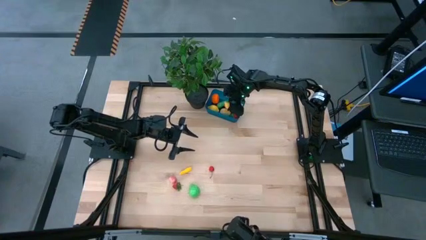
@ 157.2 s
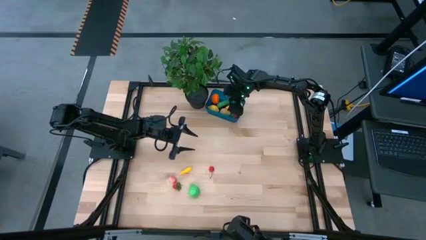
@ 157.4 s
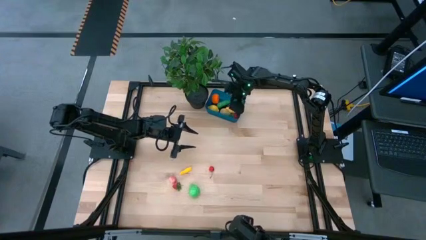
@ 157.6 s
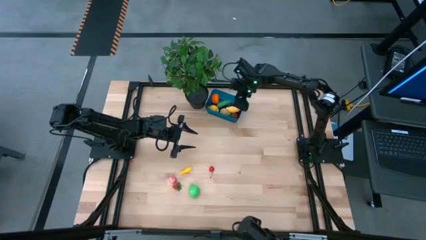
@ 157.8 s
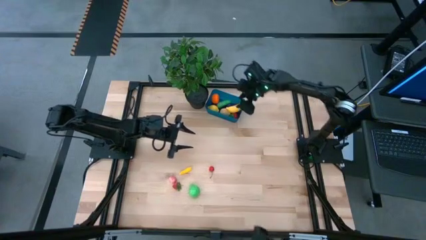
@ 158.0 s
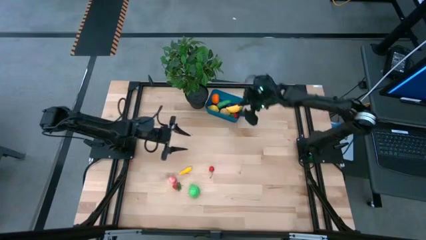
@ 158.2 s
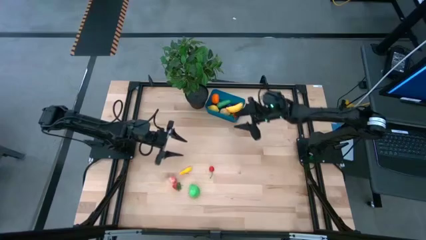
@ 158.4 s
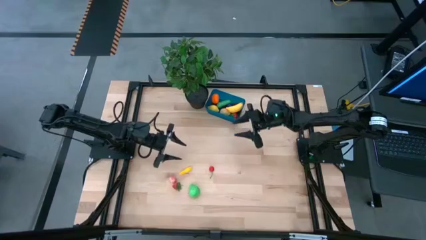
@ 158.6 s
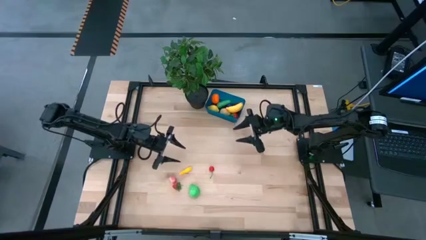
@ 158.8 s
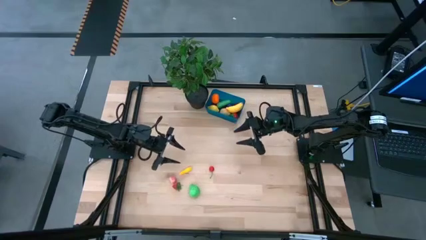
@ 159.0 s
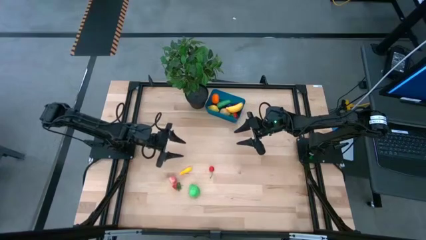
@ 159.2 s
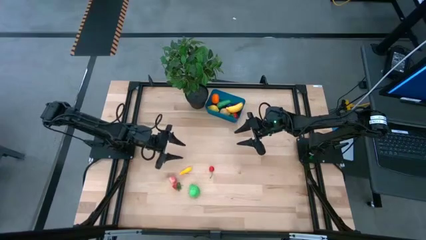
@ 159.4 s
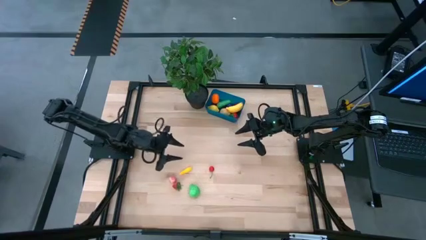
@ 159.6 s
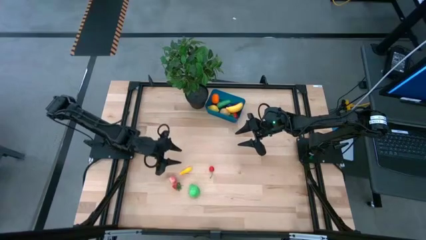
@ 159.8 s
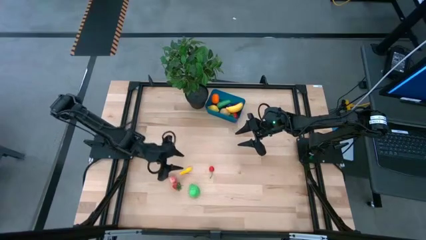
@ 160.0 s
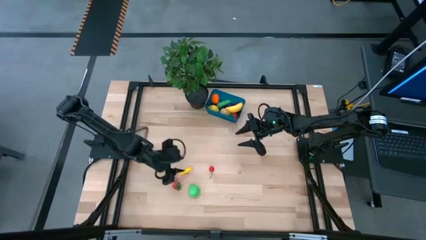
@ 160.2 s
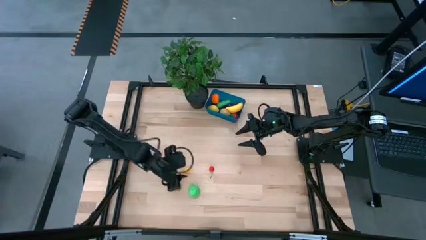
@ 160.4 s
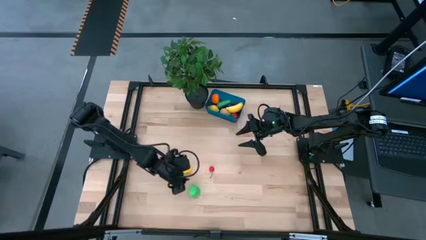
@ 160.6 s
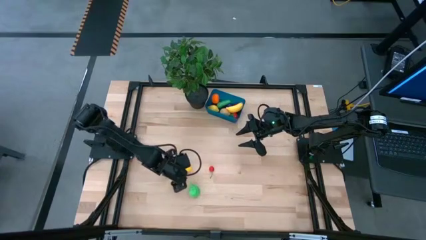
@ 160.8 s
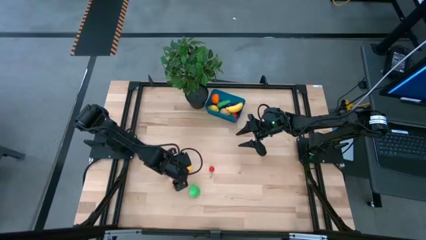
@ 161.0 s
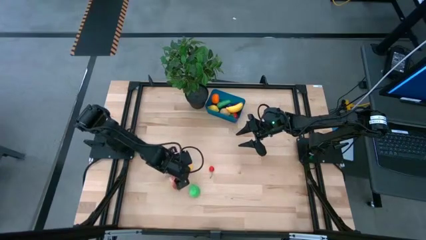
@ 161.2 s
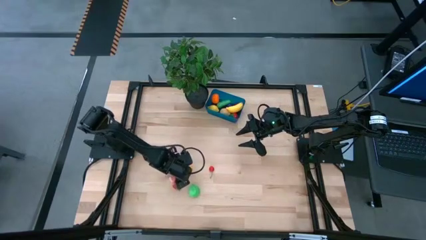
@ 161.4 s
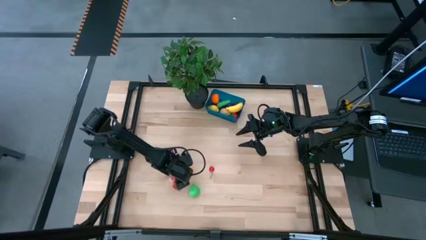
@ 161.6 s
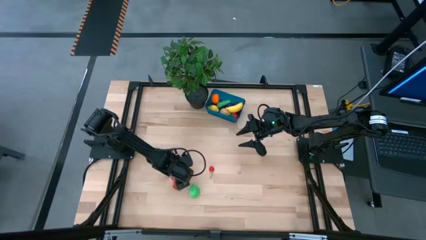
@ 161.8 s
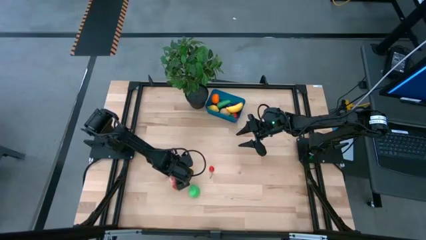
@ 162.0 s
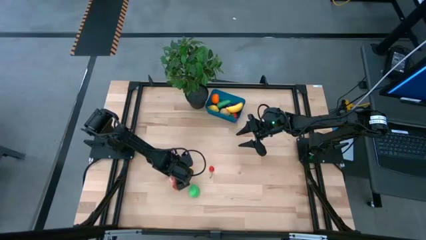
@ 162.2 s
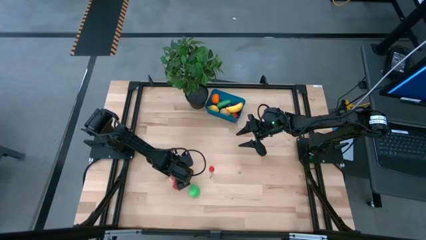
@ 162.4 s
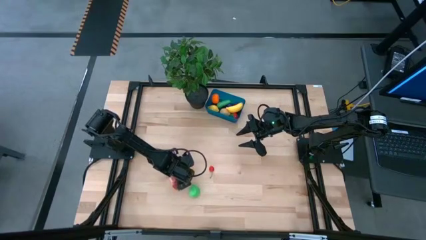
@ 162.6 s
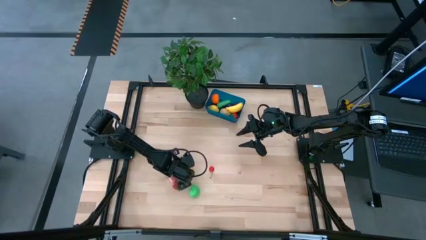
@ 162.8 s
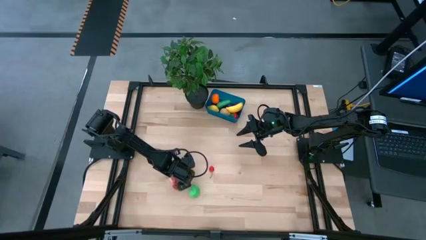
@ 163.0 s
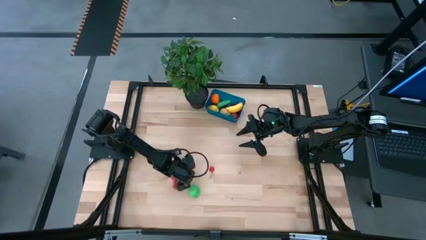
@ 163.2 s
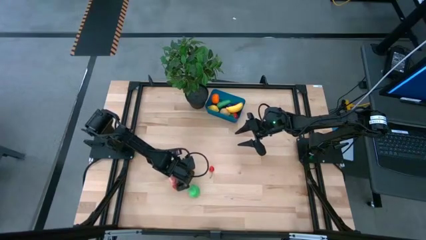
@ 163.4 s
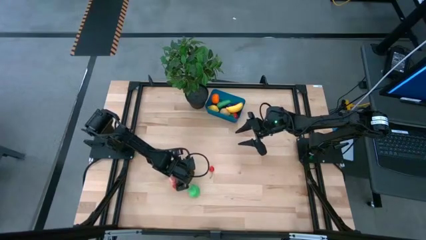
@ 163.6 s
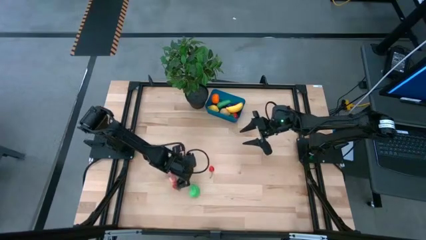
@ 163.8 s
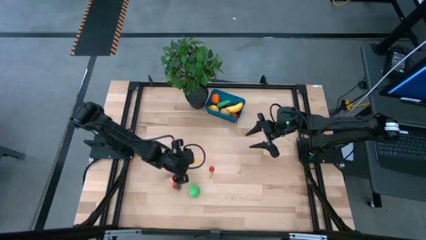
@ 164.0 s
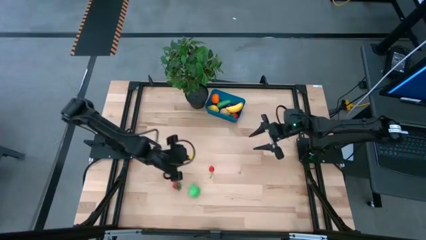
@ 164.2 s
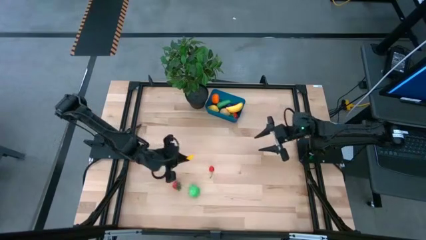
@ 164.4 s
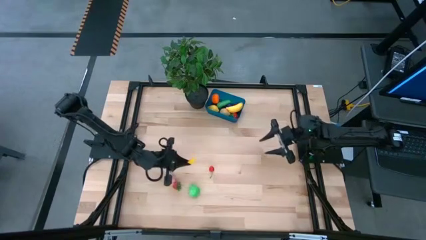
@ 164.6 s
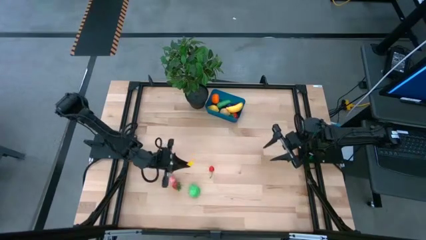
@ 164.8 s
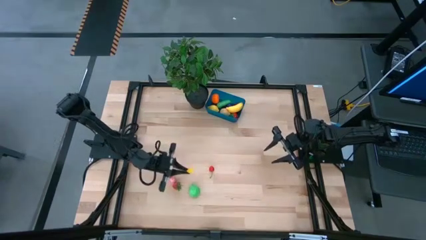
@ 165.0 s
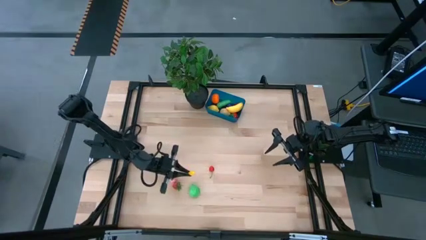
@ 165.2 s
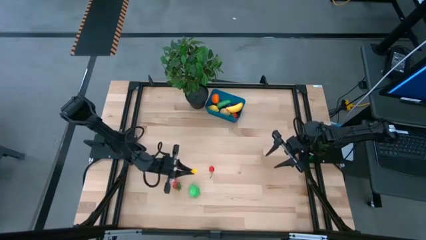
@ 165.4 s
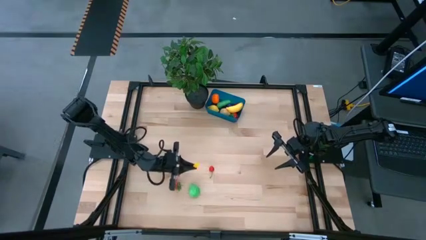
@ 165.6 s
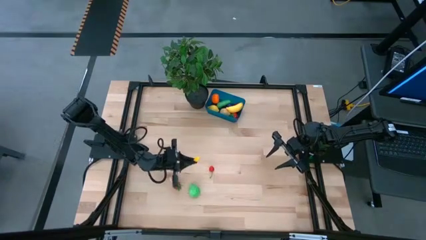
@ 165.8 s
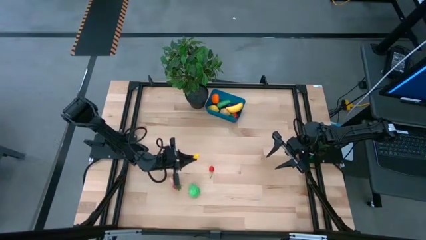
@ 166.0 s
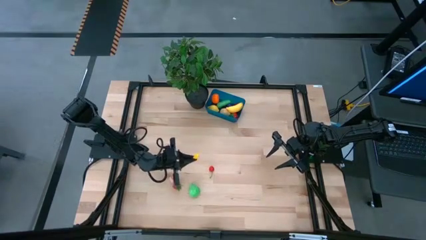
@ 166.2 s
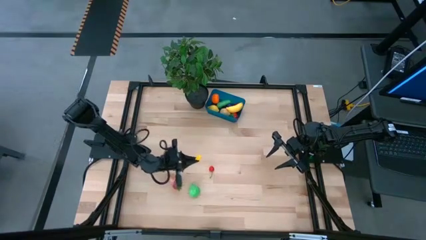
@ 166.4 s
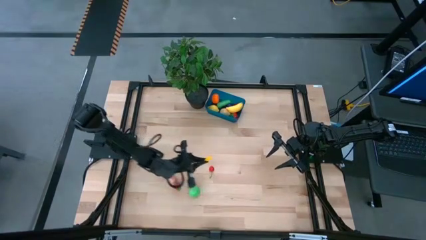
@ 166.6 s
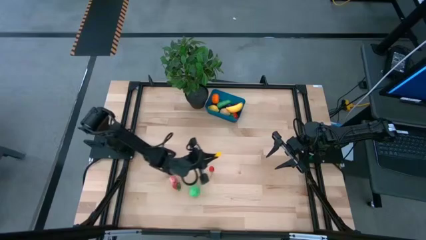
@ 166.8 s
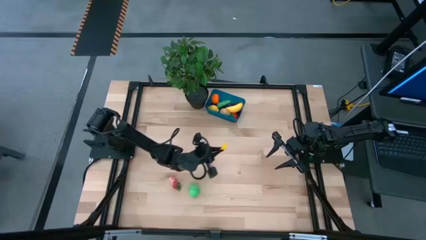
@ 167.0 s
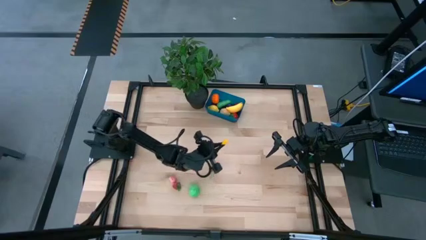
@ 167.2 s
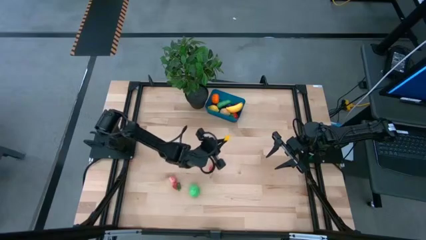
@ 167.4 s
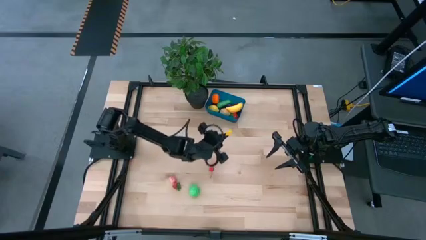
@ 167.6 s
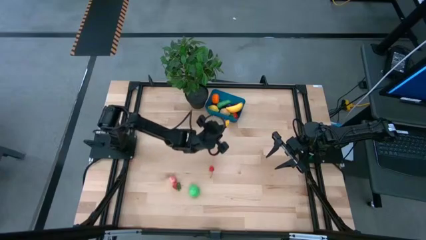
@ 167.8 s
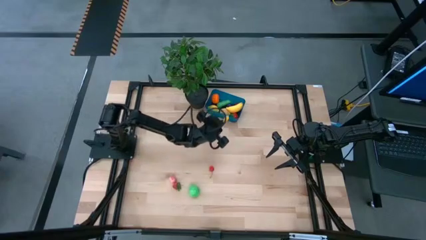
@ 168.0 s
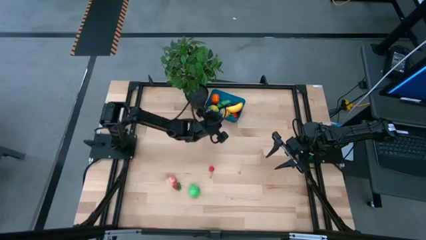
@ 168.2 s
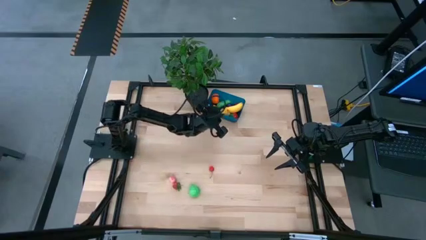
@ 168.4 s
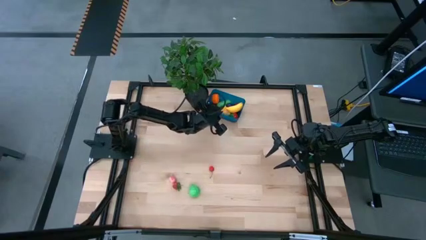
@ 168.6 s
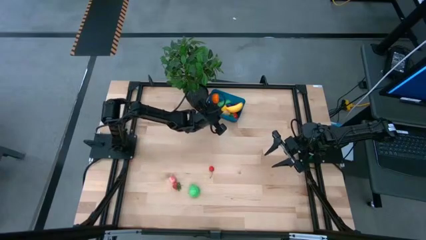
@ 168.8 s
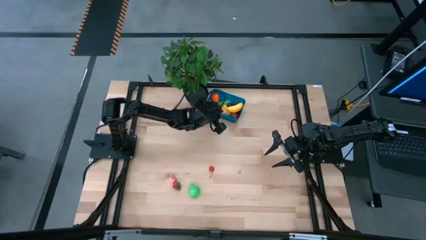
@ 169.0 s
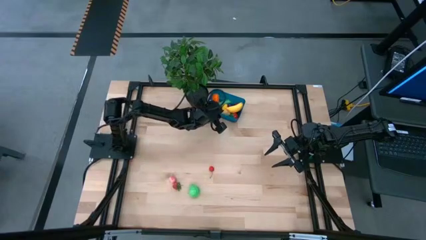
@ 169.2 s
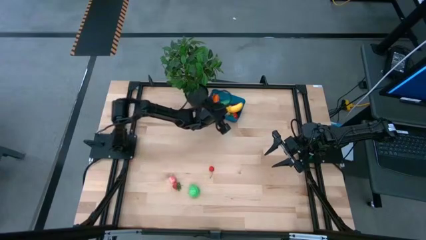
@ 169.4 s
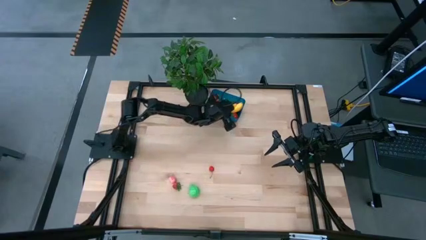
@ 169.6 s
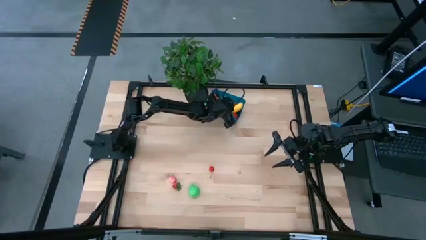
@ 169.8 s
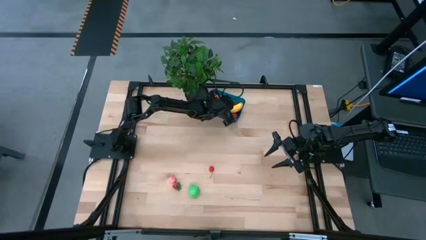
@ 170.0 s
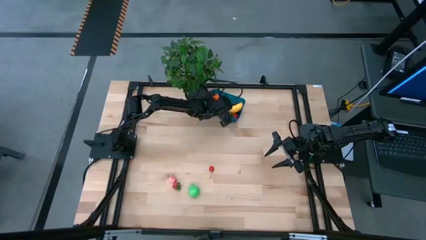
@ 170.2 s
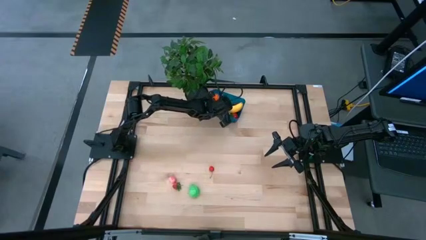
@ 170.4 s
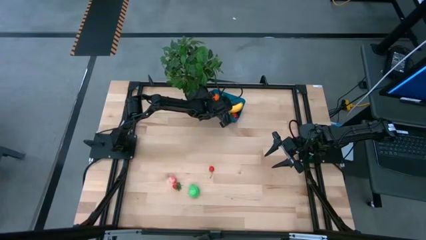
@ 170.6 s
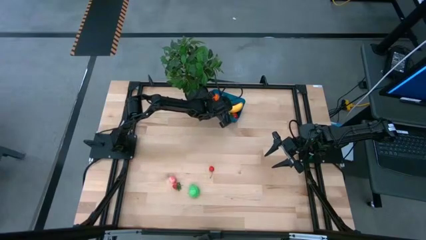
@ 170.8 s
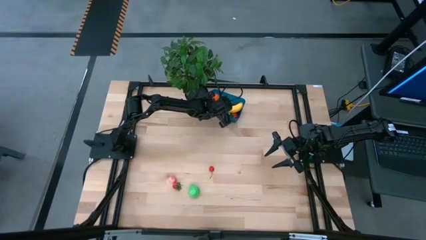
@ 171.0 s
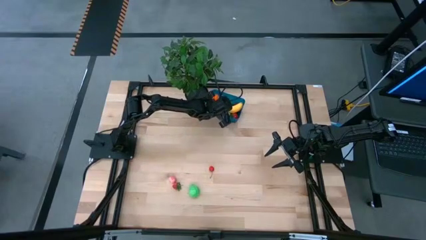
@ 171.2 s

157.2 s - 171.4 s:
Task: Pick and placing Produce into tupperware
Put the yellow corn into the blue container
